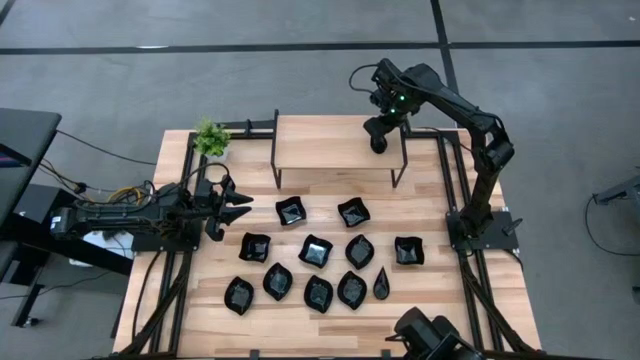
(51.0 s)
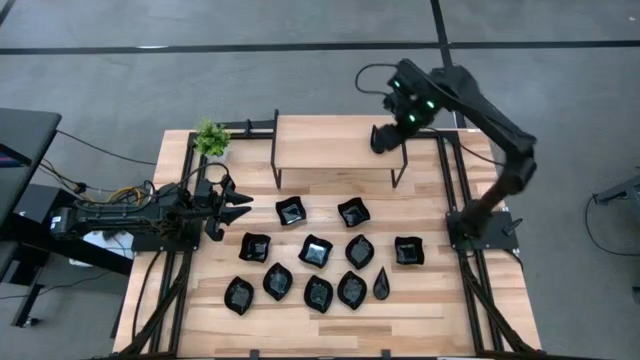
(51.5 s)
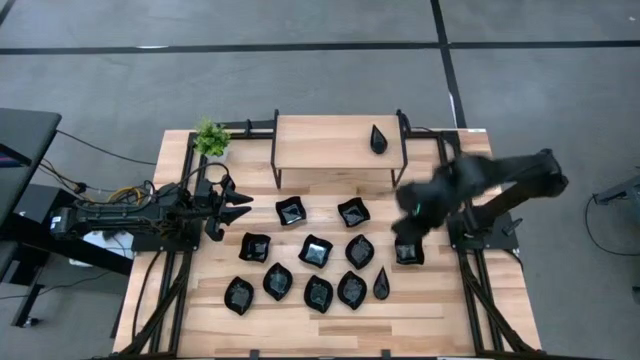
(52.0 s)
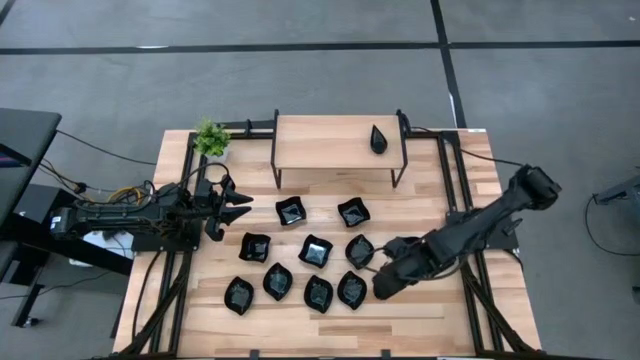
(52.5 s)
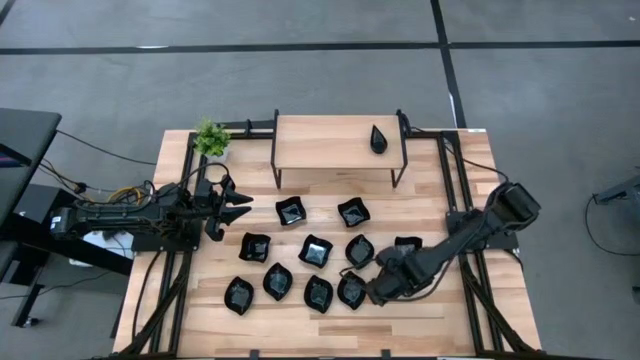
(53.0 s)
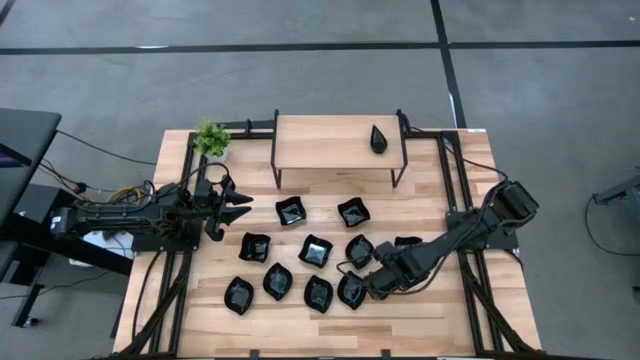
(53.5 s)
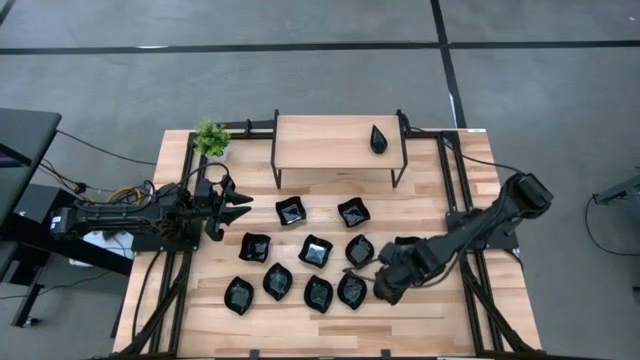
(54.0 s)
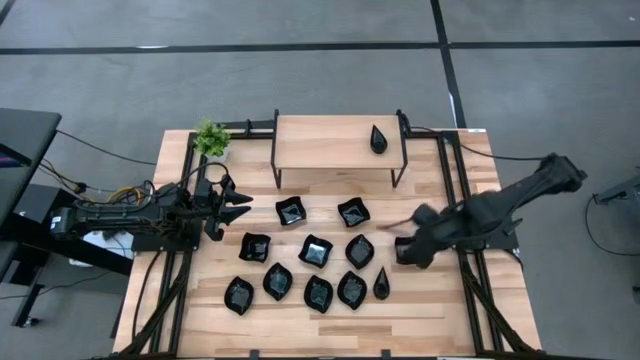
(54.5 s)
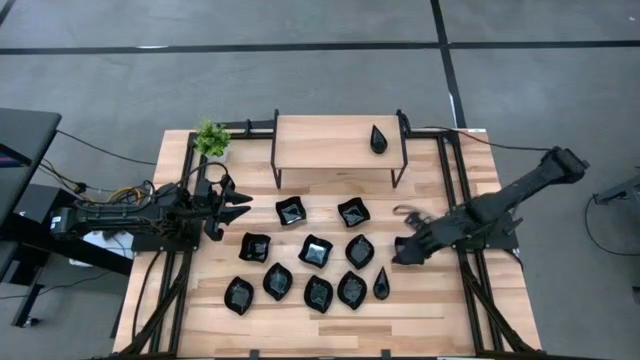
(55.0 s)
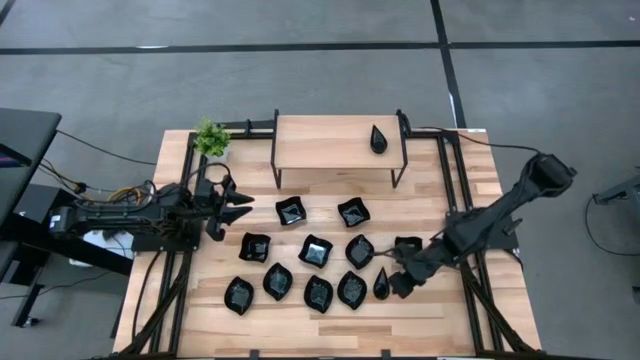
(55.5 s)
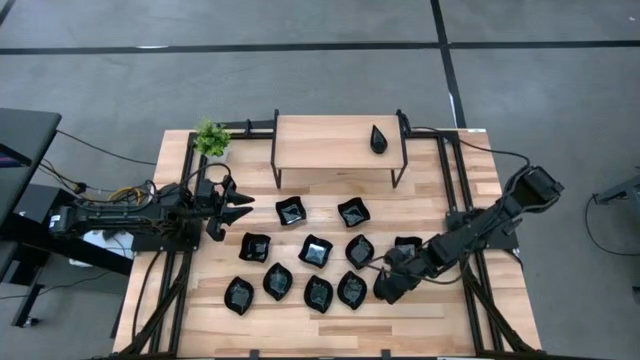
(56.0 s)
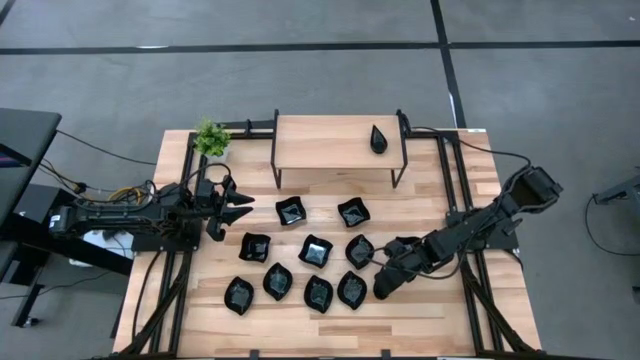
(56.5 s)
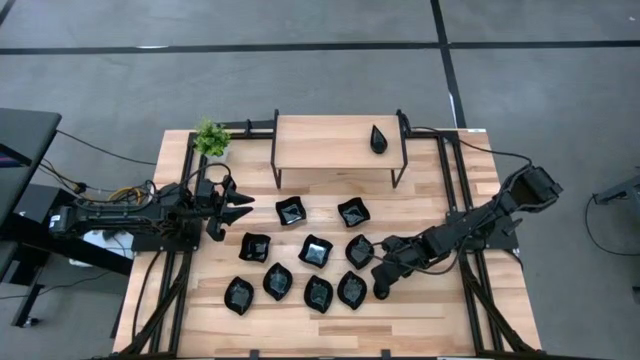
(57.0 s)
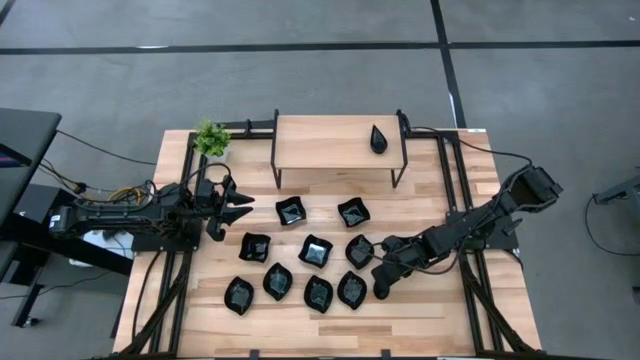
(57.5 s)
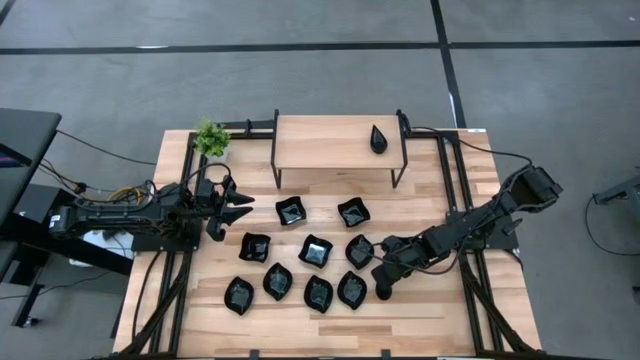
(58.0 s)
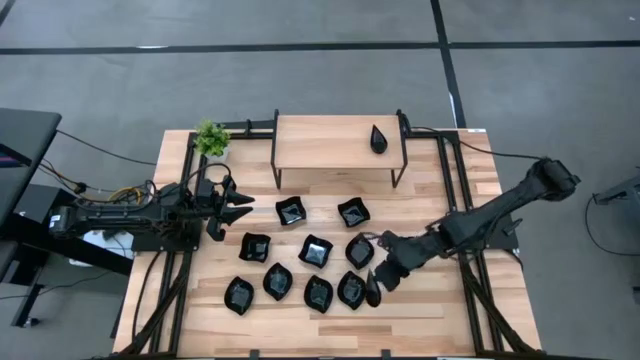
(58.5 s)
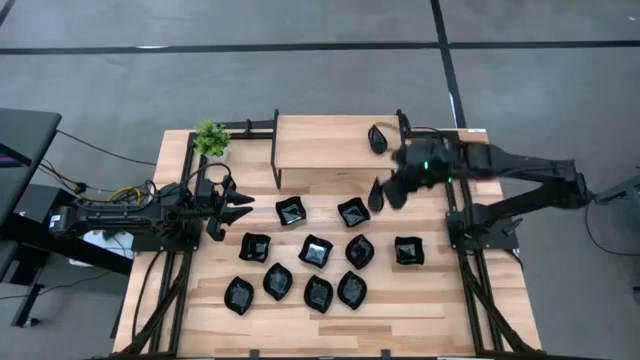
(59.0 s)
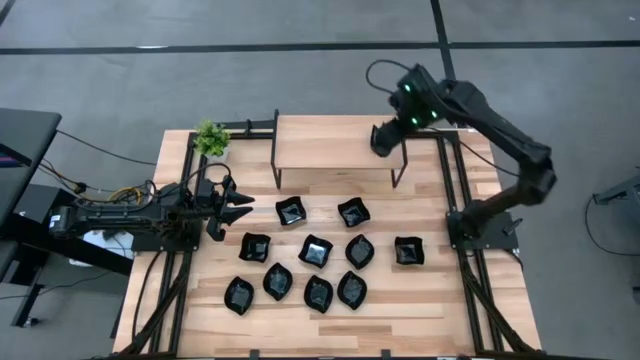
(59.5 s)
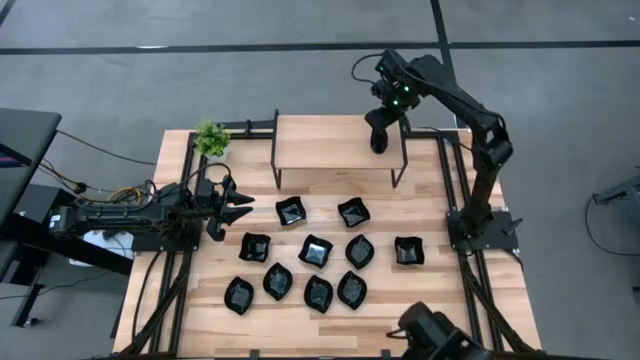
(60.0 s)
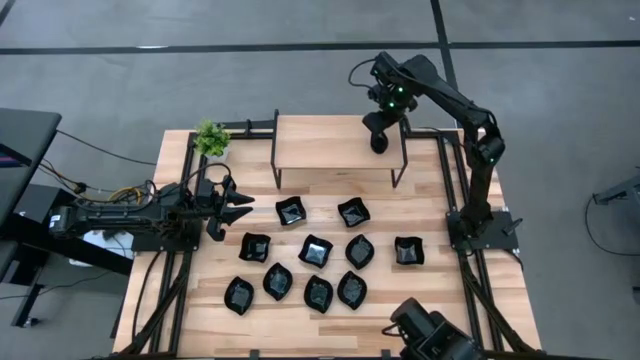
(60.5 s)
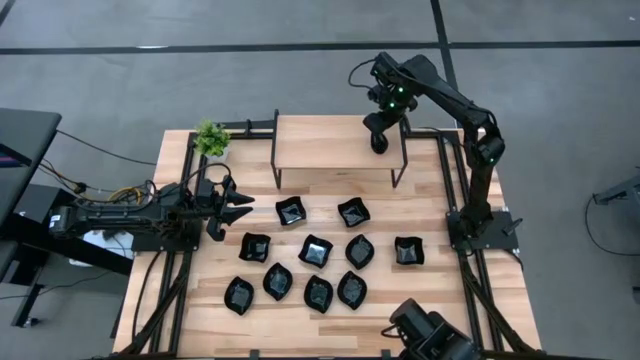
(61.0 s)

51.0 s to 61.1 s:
Task: Pick & Place Mini shaped plates
Stack the drop shaped plate on top of the other drop shaped plate on the shelf

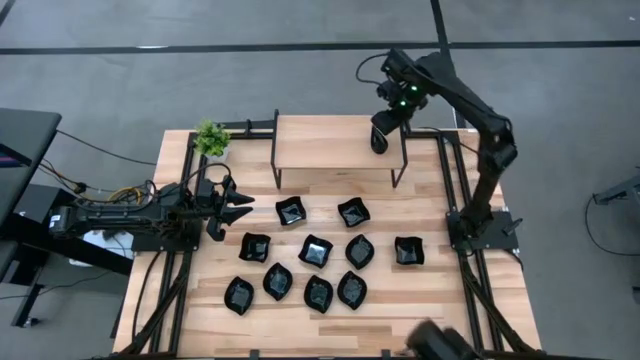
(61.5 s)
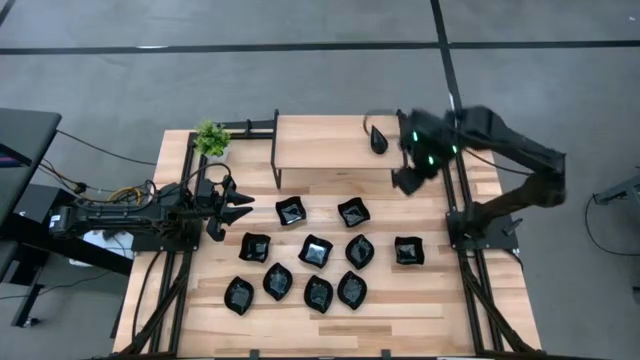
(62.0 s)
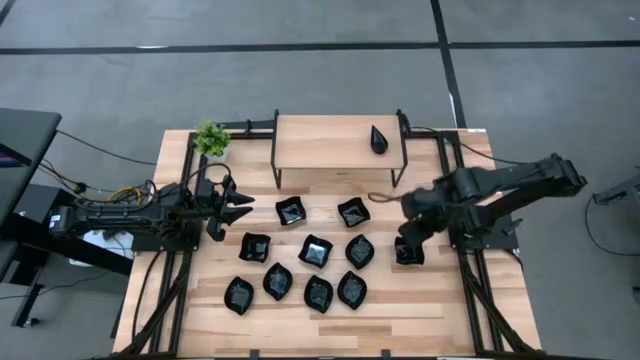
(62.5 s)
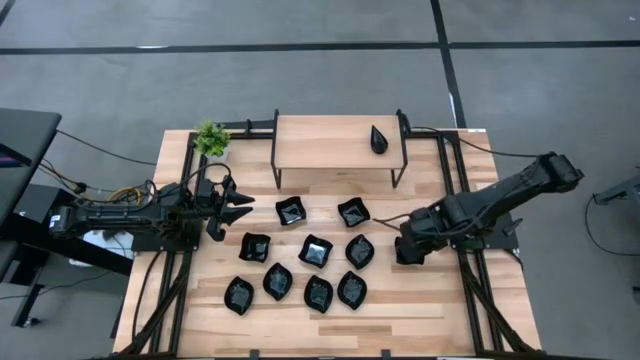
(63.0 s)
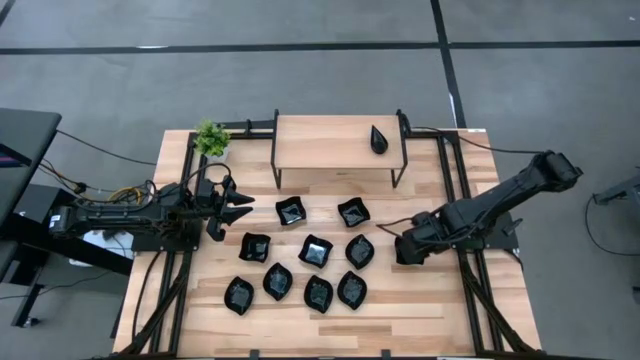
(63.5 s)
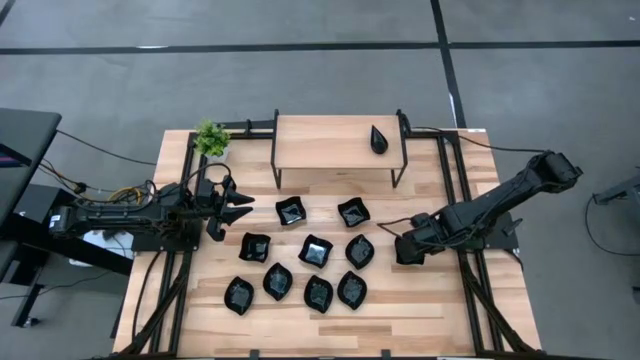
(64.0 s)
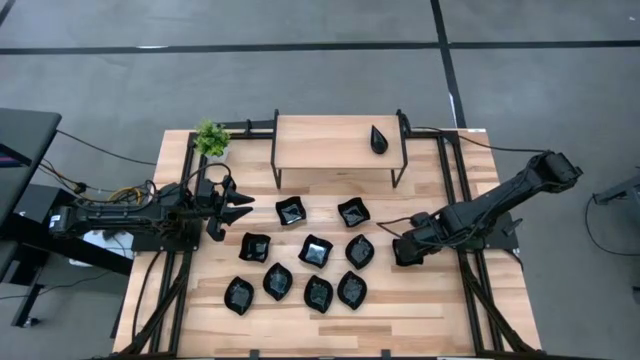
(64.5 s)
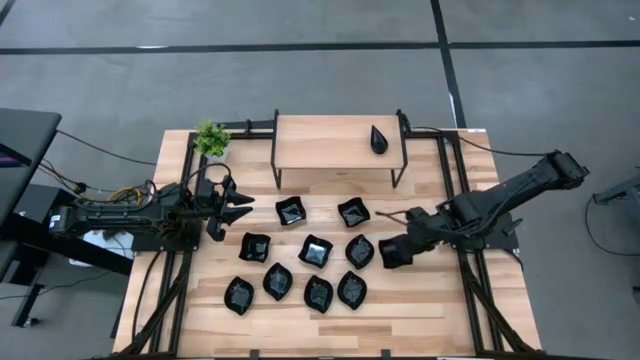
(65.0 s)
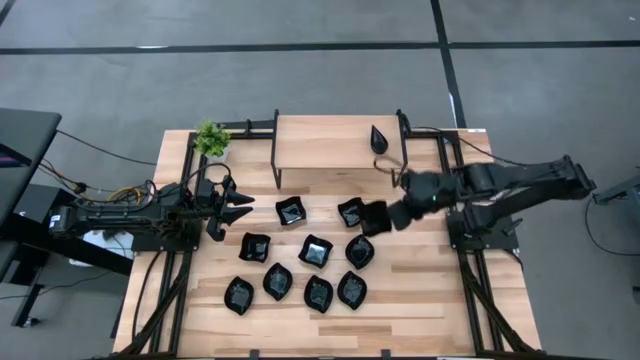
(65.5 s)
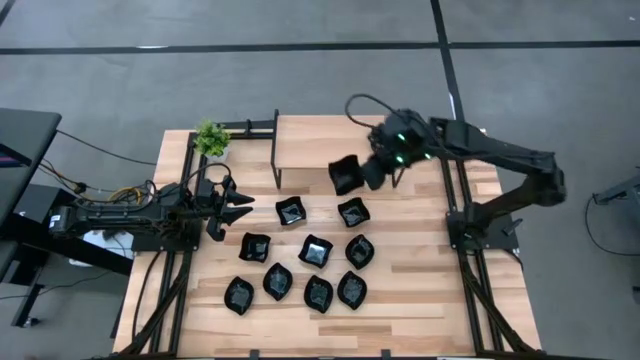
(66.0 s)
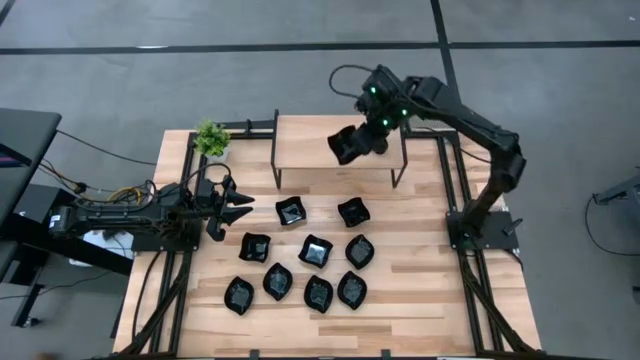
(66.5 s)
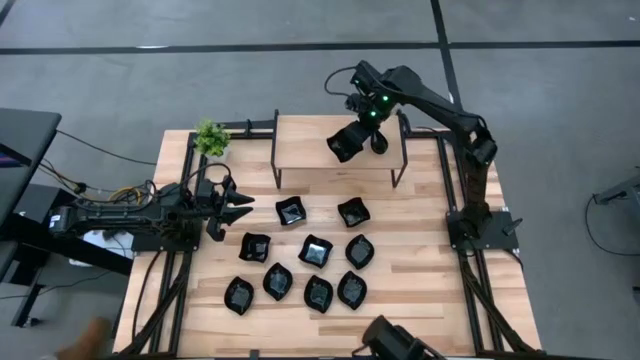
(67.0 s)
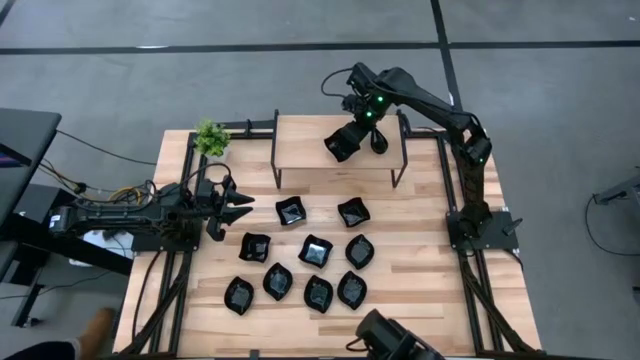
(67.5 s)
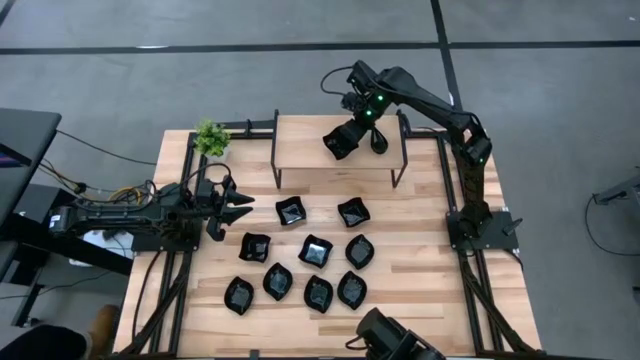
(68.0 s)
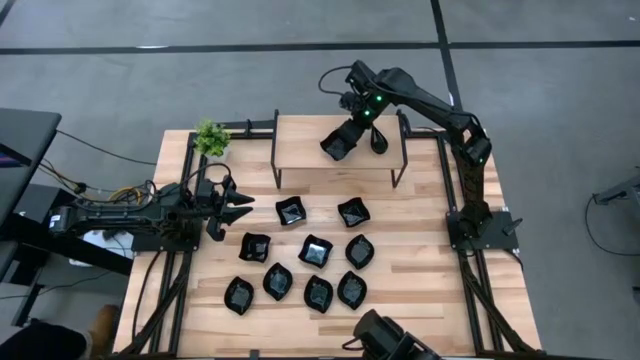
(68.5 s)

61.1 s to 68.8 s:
Put the distorted square plate on the shelf

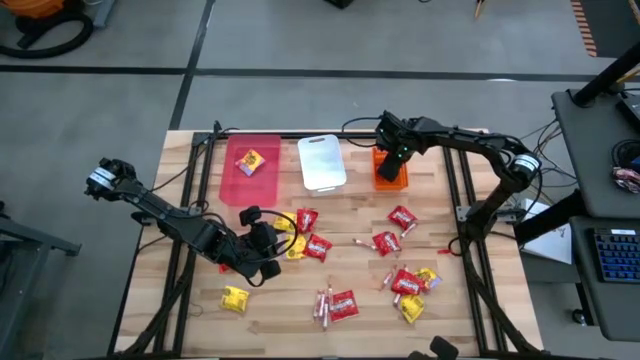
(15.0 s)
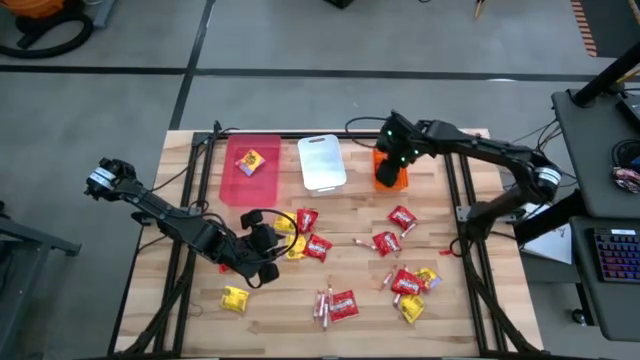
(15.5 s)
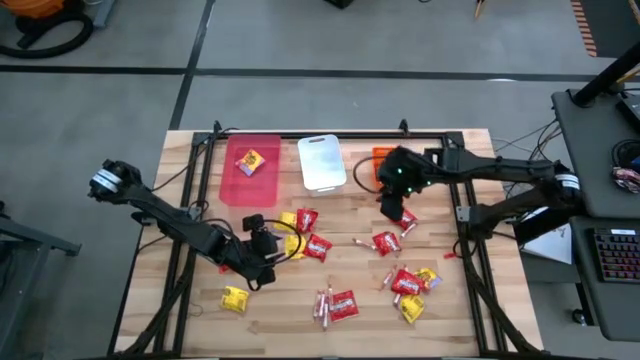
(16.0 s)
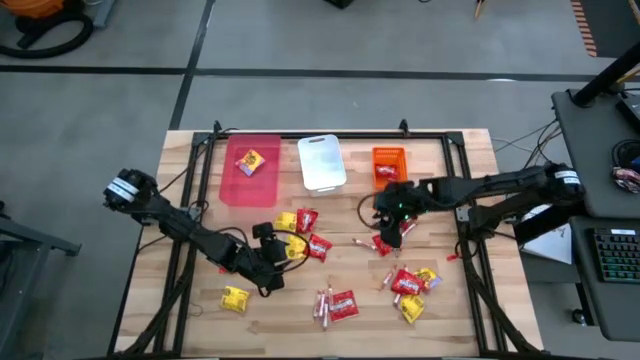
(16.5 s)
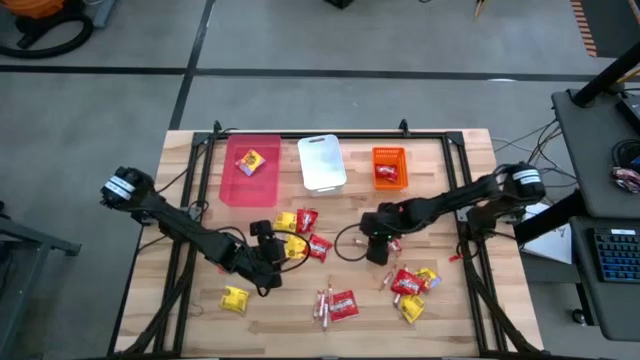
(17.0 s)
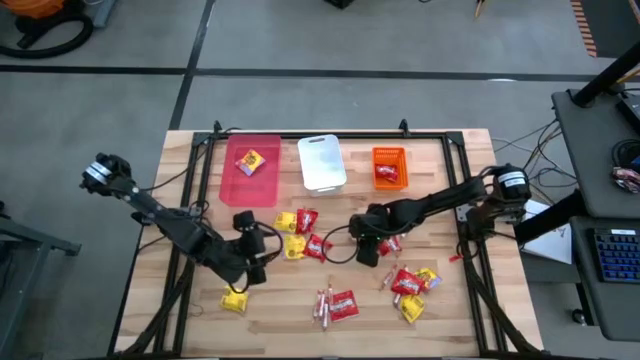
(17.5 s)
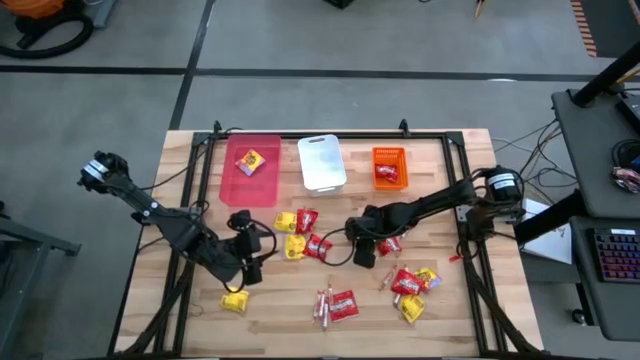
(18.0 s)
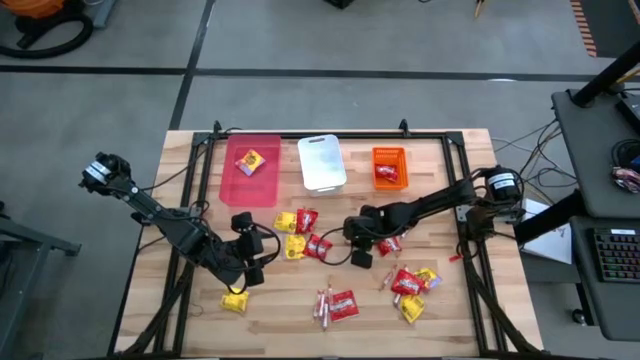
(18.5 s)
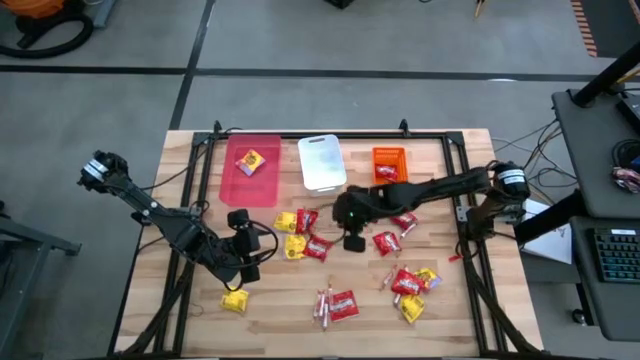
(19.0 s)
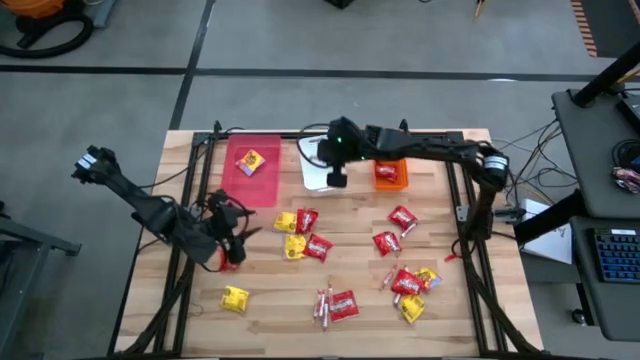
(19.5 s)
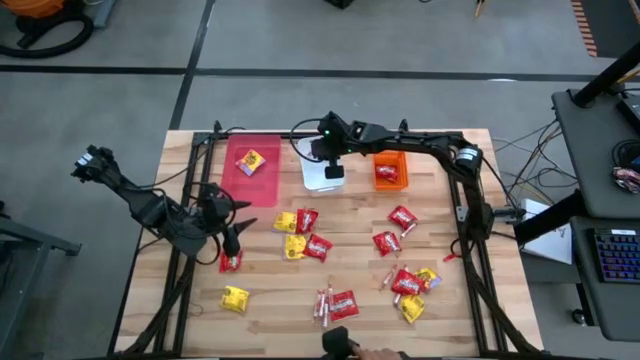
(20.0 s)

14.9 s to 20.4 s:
Task: Sort candy
Put the white candy into the white bin
